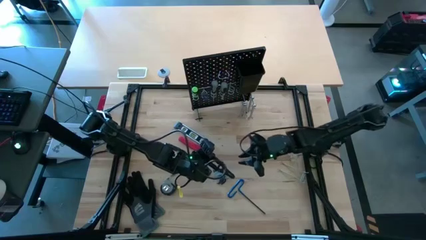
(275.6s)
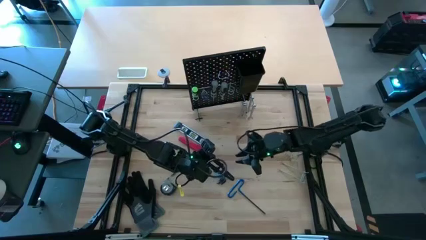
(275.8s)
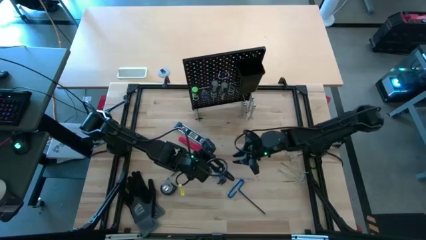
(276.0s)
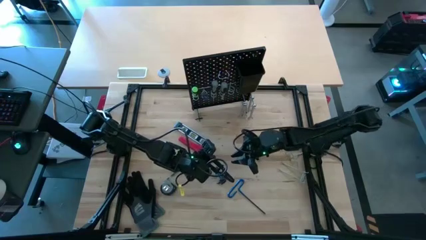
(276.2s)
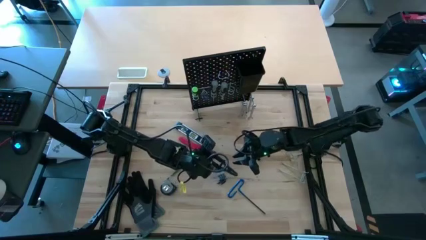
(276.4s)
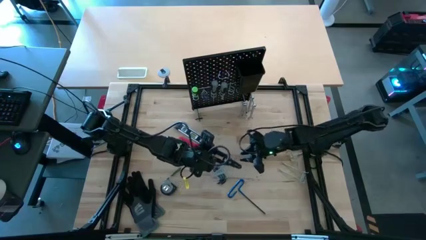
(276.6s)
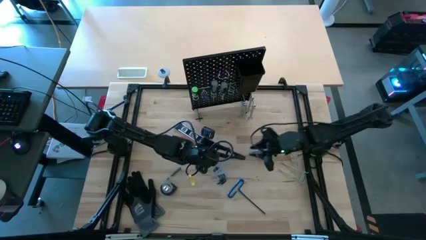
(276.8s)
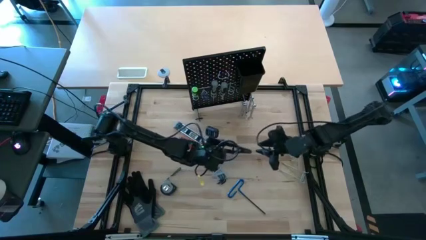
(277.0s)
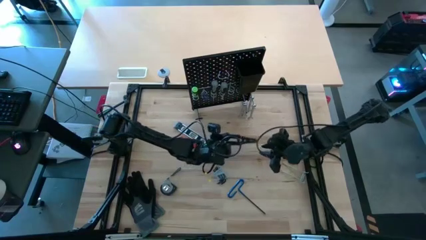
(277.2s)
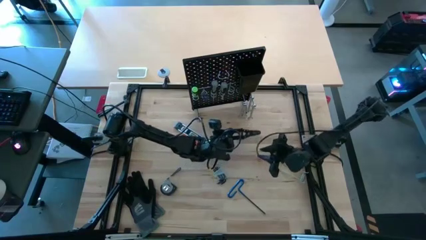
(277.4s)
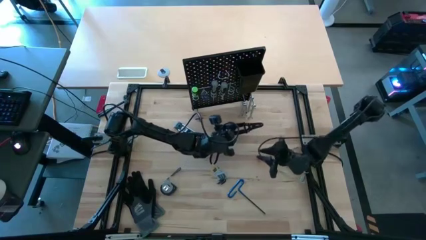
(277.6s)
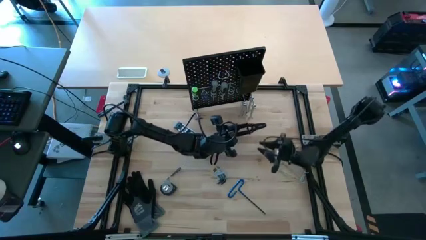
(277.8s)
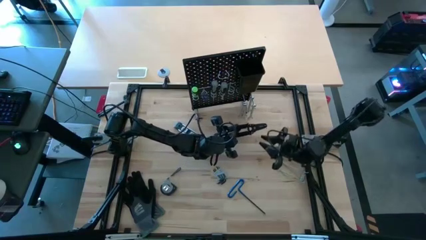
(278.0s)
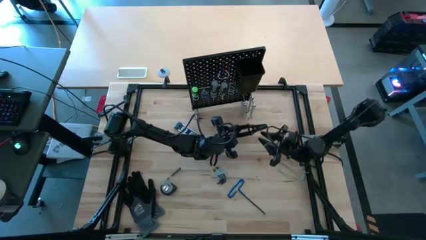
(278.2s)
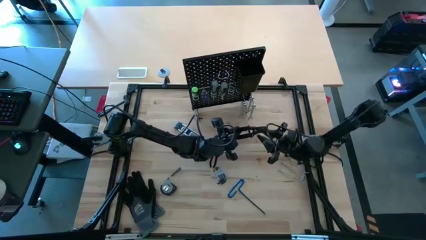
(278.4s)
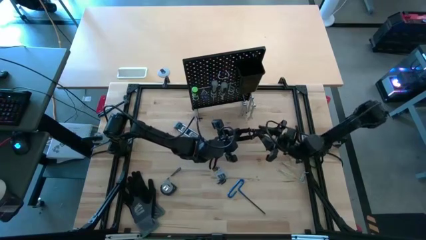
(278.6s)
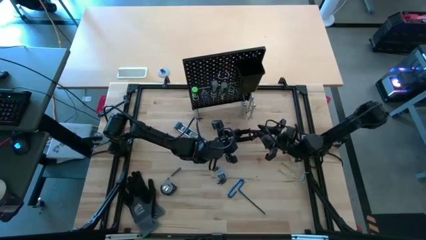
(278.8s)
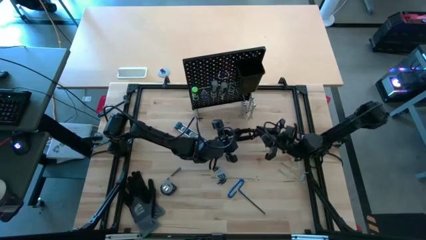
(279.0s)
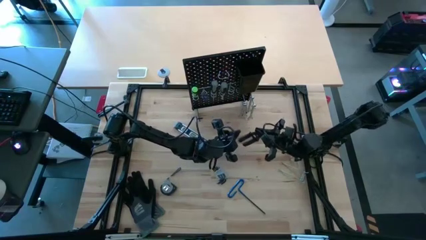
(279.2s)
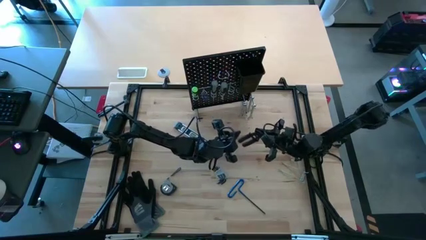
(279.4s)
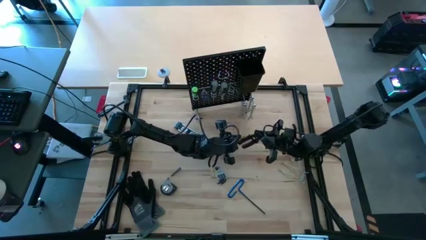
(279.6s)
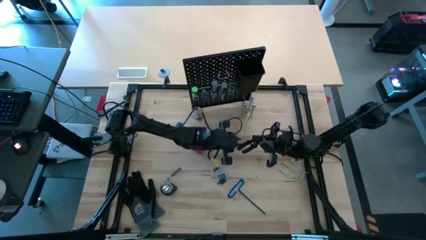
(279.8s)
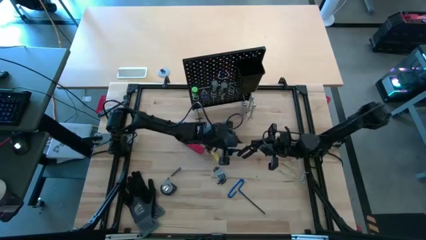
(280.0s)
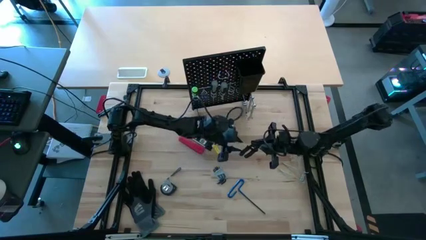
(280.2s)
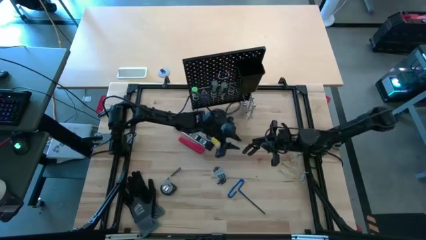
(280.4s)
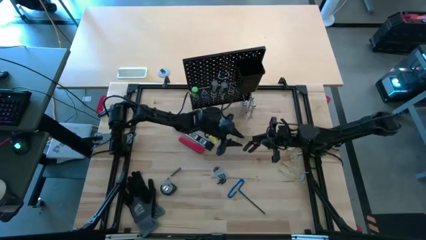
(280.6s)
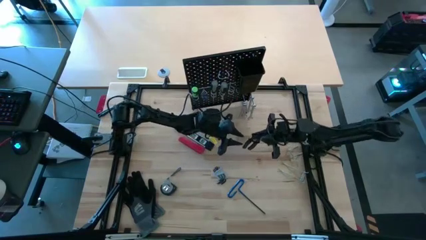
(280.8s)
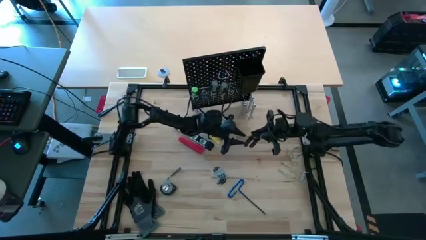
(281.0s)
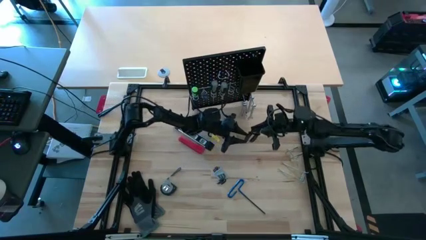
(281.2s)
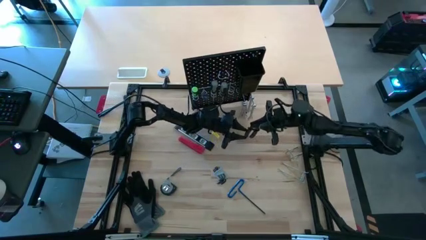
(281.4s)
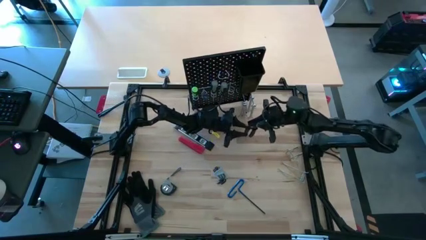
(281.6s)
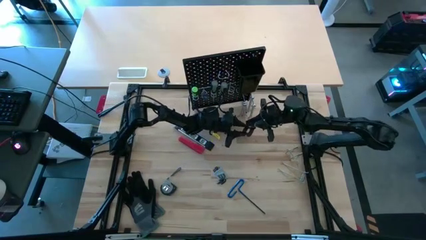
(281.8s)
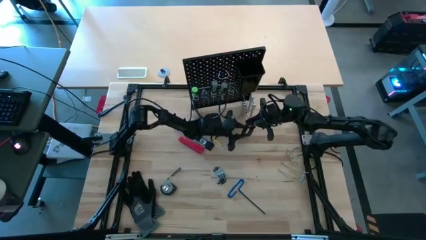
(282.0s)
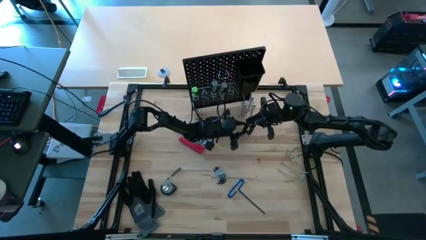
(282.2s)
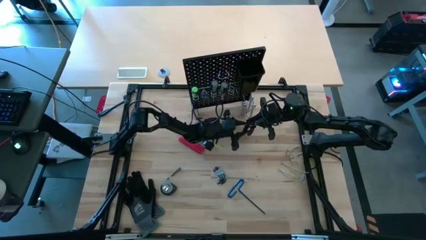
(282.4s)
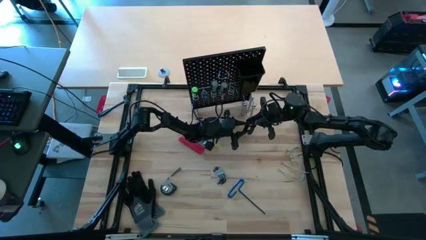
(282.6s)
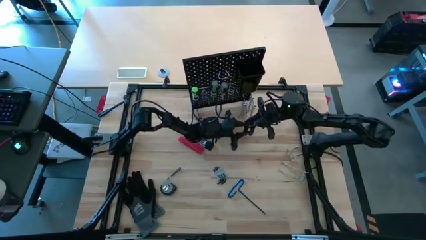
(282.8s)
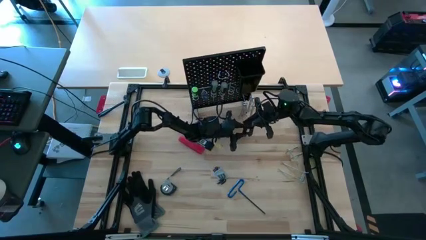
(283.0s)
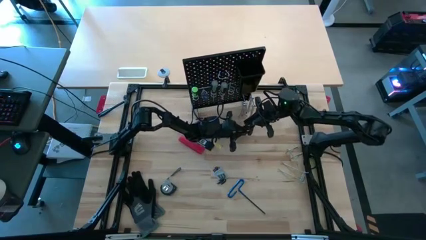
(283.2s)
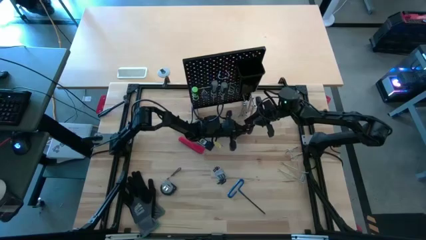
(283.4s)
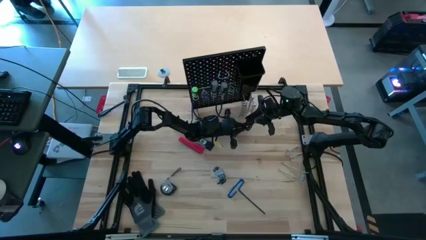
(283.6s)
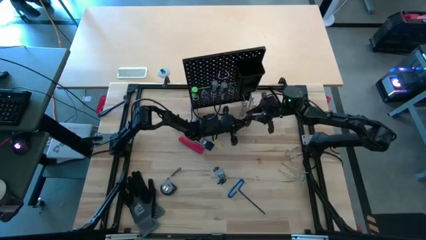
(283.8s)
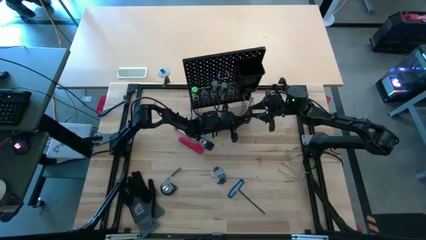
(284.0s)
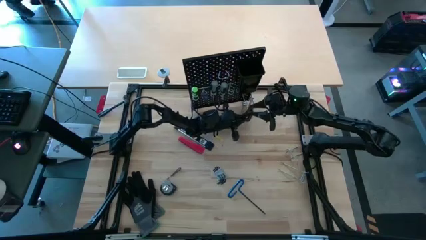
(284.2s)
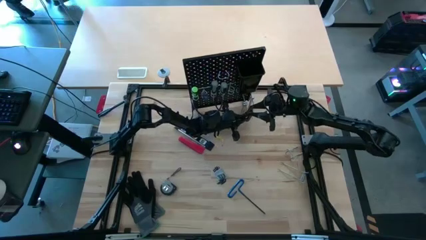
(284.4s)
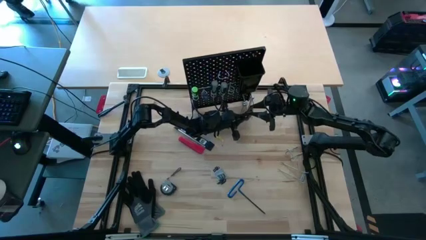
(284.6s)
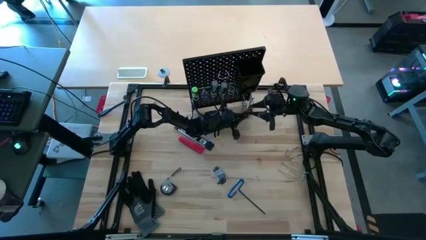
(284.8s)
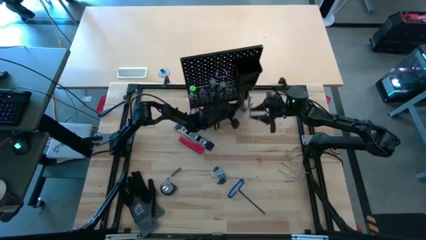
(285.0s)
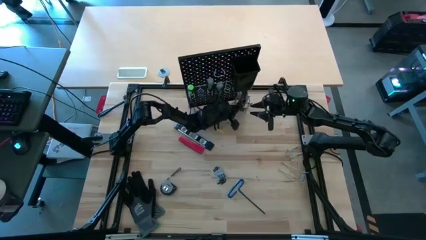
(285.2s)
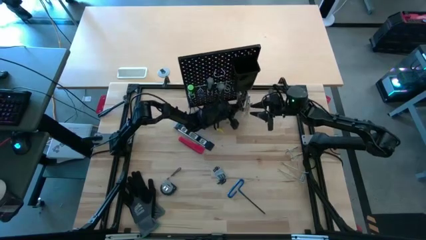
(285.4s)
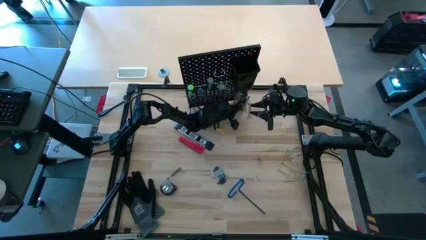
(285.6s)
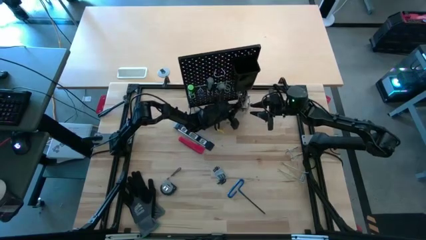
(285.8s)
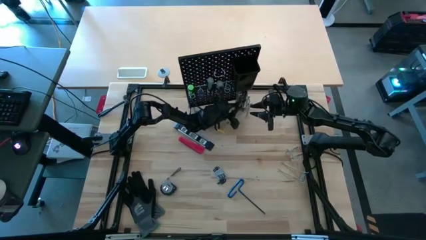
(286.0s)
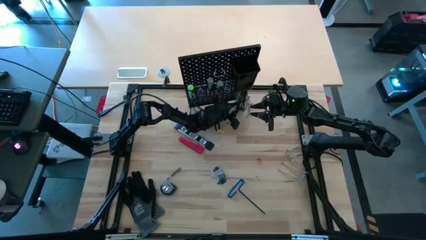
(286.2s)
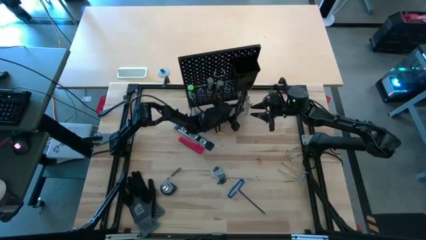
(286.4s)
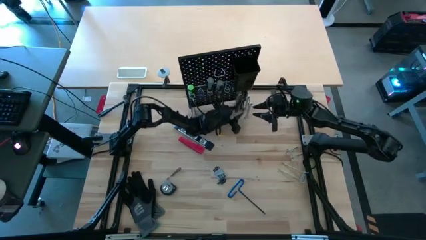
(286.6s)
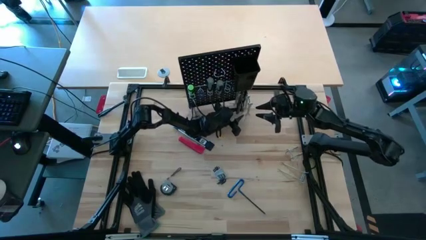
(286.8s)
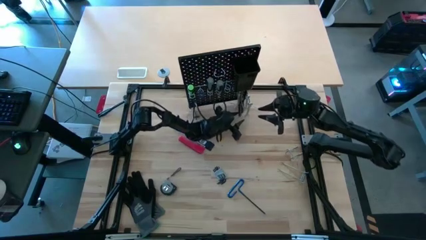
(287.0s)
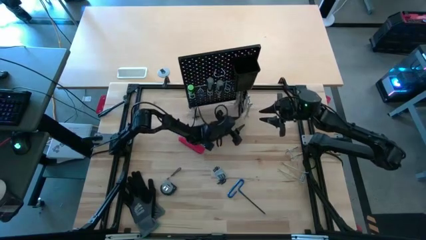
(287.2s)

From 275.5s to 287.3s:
Task: Hang tools onto peg board
Hang the black wire stripper onto the pegboard

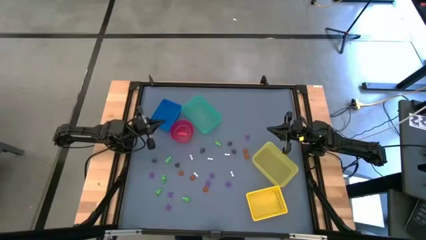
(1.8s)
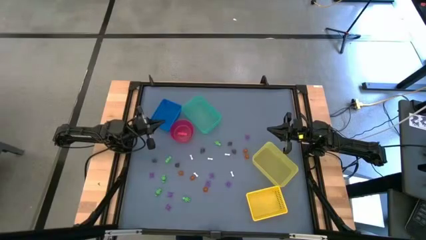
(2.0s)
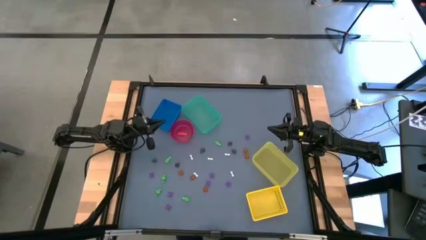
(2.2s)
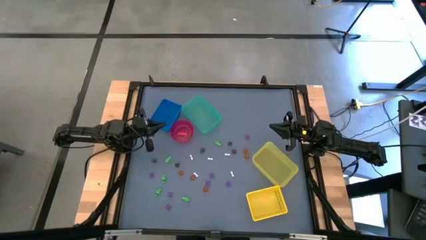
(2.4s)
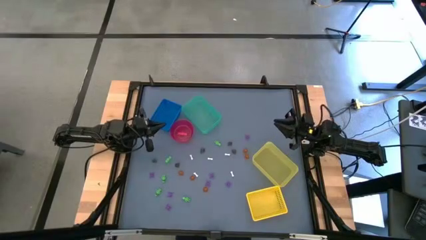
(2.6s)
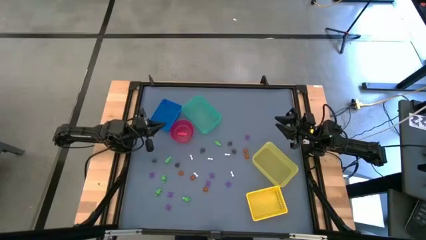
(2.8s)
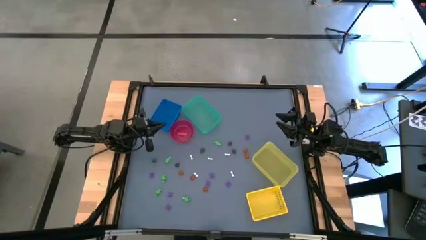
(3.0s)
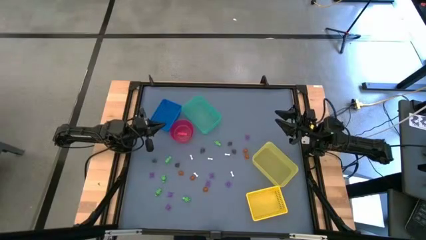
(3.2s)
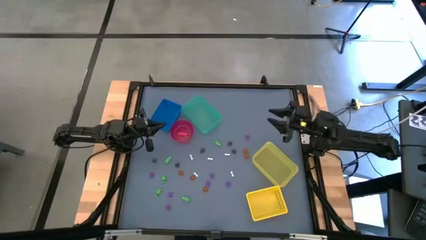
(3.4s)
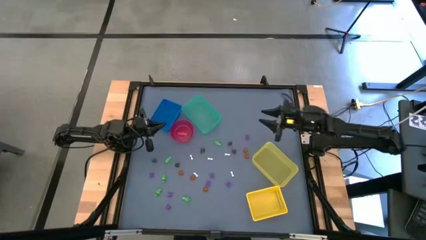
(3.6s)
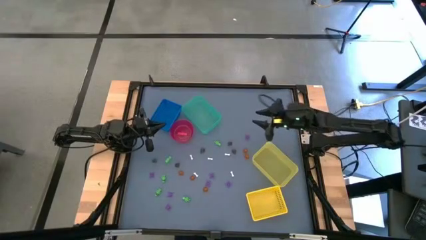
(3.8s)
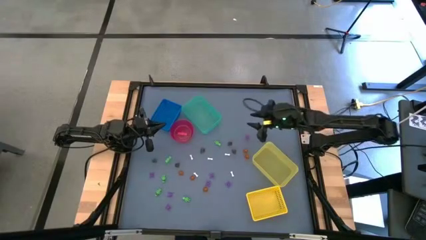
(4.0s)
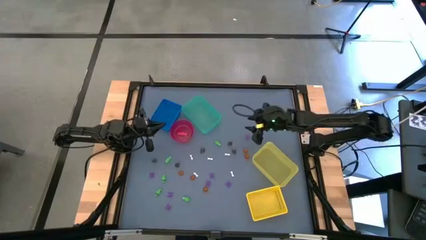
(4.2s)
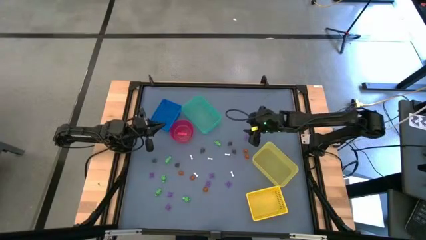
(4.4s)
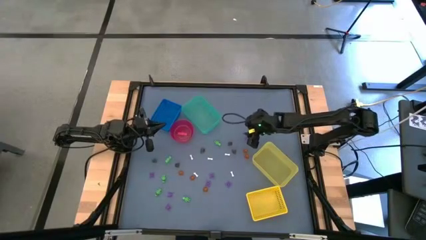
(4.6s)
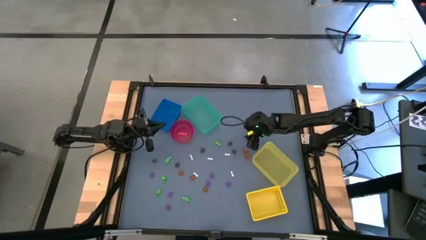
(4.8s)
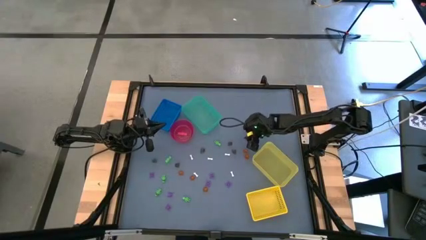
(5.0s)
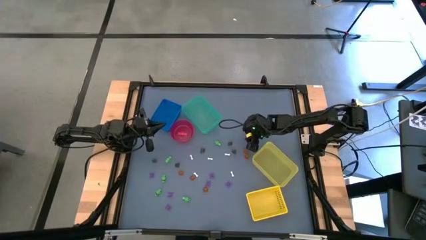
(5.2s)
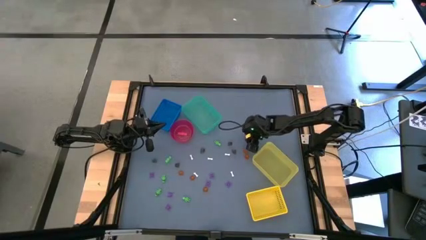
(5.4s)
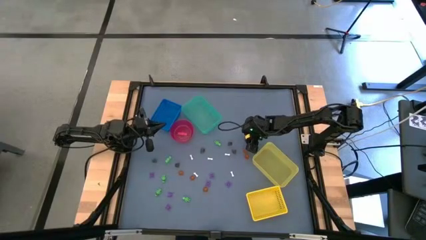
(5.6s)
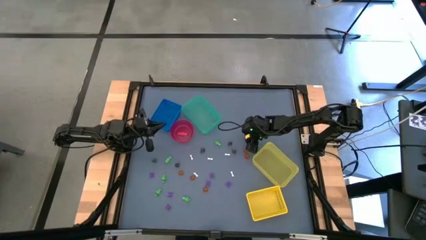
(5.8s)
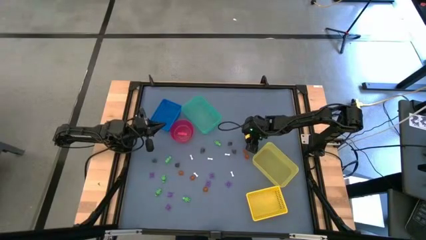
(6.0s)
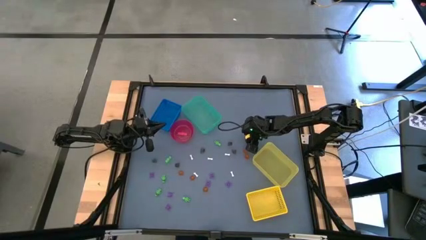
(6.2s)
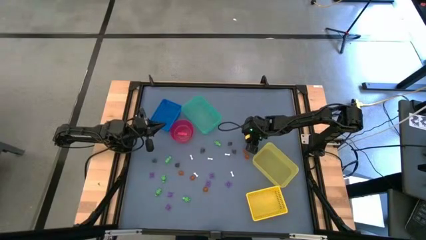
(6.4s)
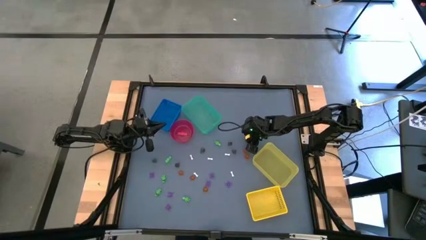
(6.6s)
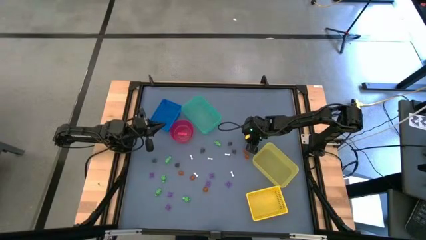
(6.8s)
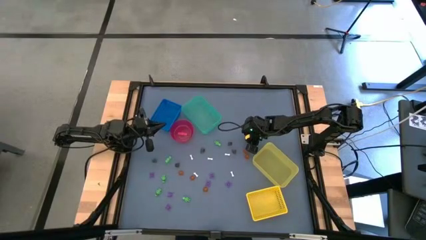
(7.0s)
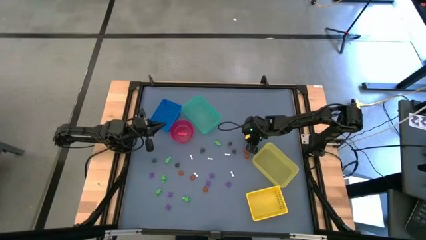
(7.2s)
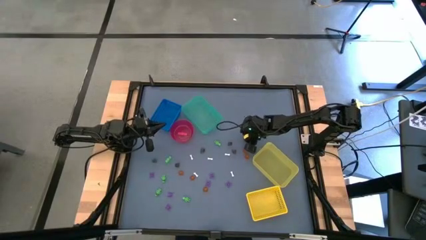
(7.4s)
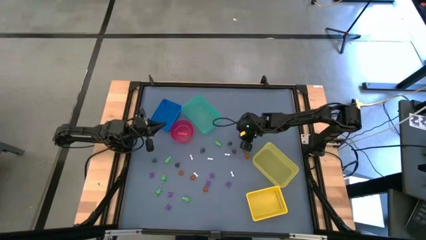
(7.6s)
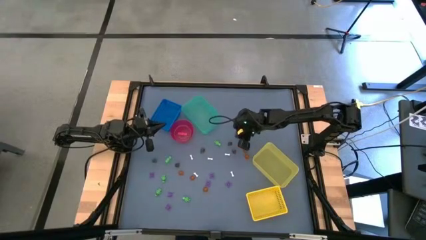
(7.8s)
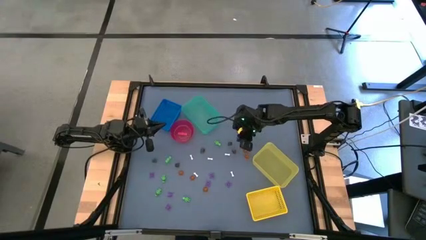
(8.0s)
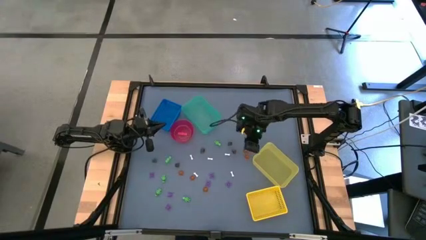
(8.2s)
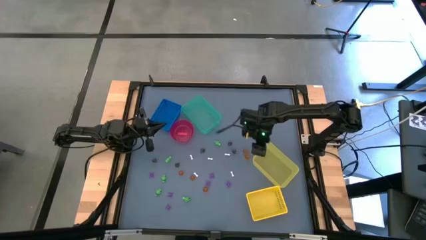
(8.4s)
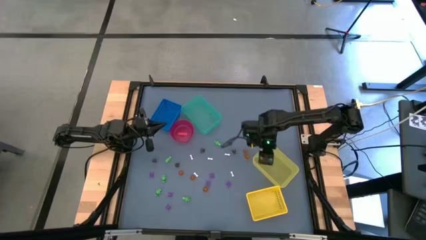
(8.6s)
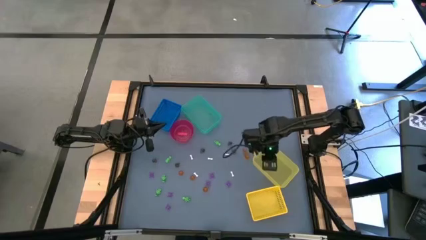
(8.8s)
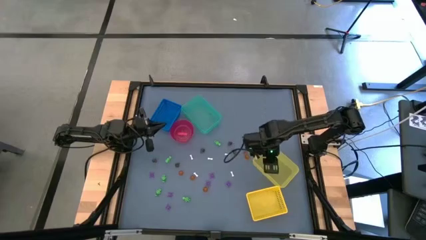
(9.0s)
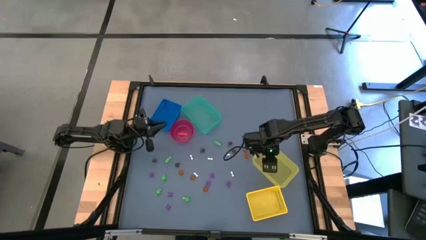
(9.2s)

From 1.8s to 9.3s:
Task: Sort Halloween decoration
Put the purple spider toy into the yellow bin
